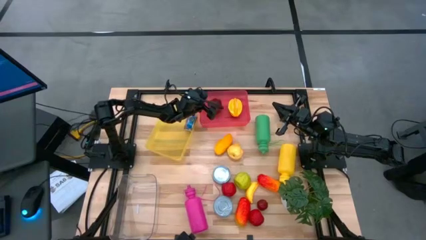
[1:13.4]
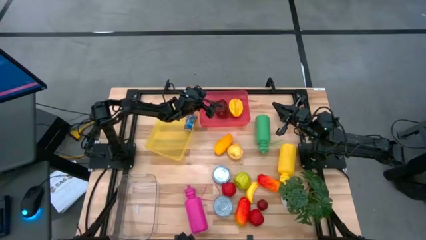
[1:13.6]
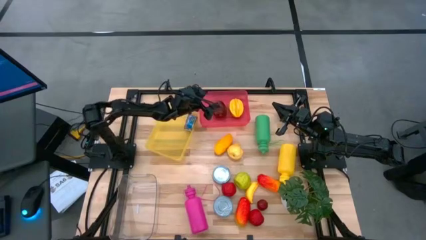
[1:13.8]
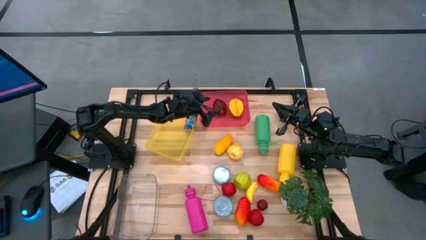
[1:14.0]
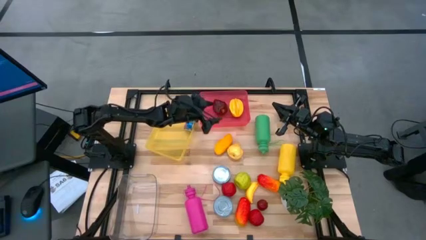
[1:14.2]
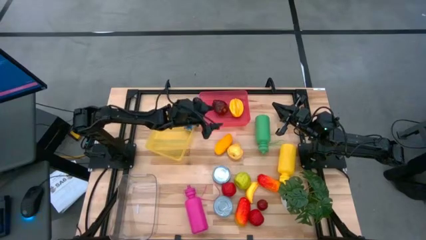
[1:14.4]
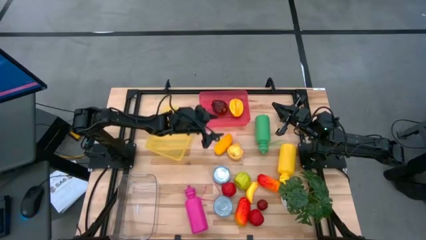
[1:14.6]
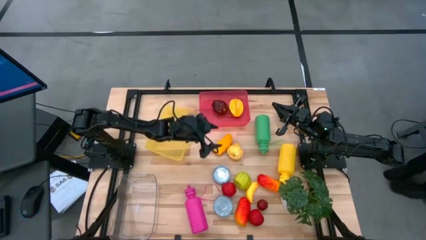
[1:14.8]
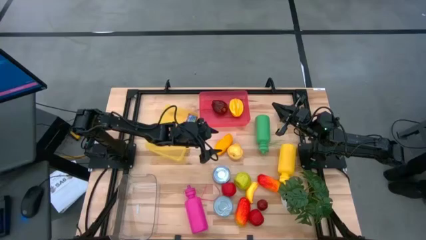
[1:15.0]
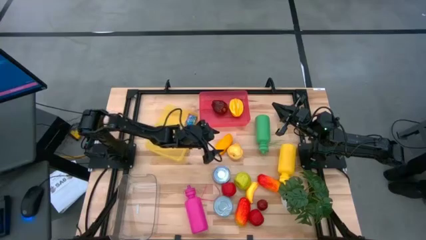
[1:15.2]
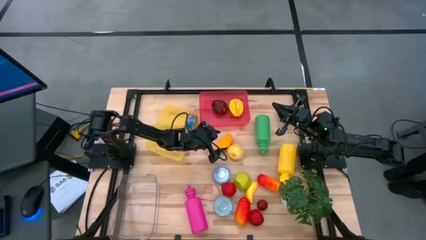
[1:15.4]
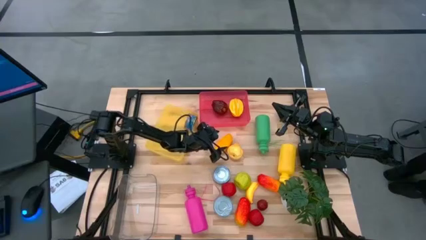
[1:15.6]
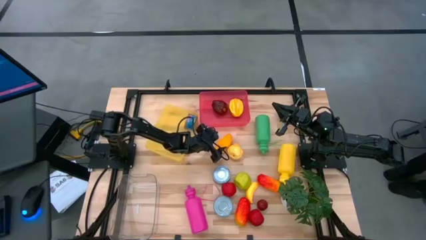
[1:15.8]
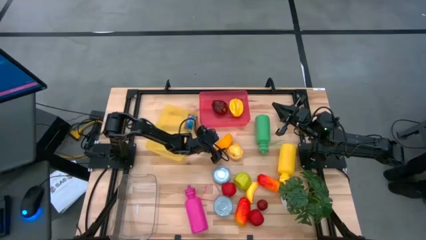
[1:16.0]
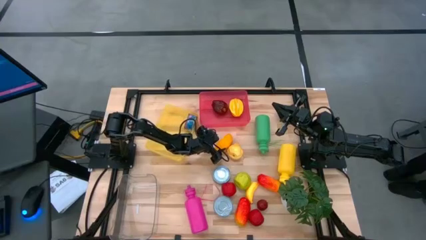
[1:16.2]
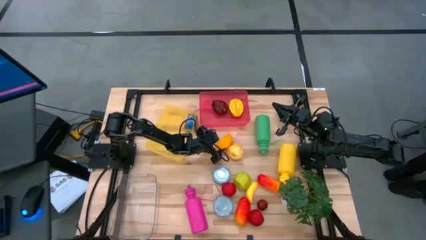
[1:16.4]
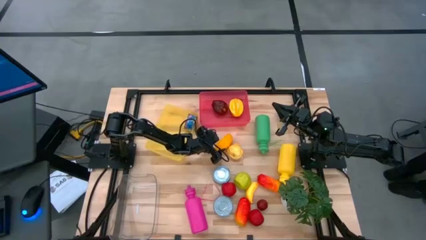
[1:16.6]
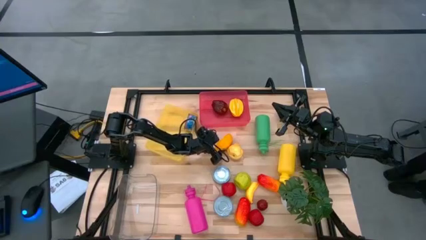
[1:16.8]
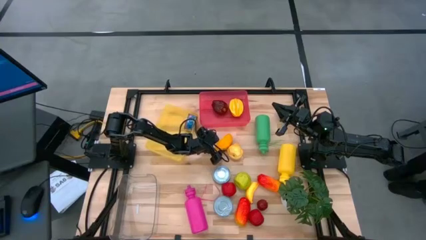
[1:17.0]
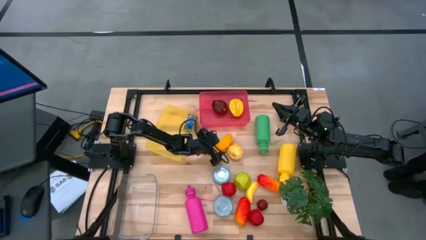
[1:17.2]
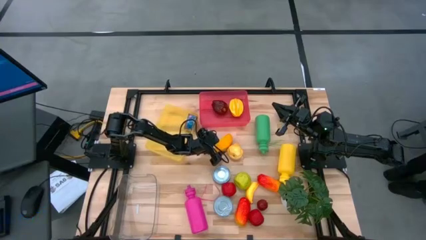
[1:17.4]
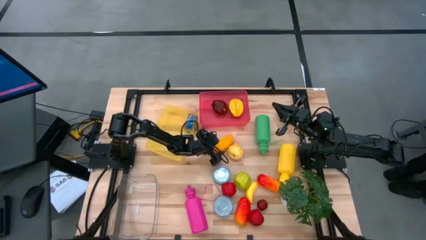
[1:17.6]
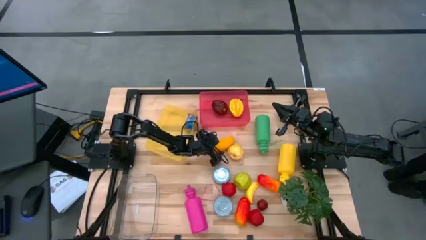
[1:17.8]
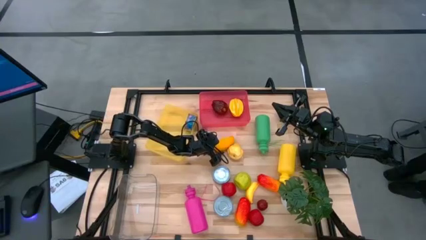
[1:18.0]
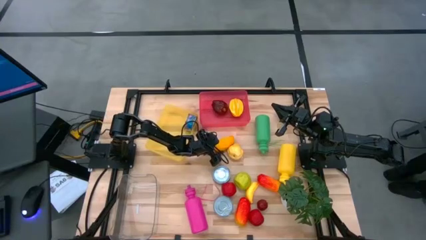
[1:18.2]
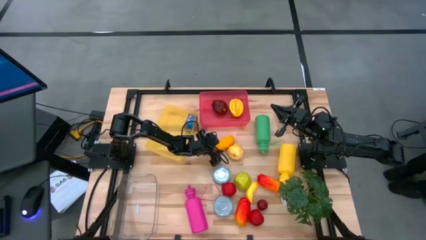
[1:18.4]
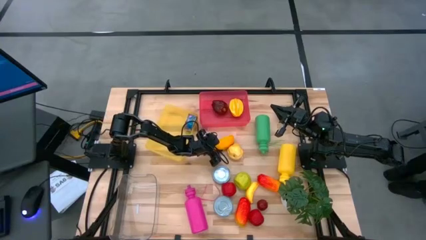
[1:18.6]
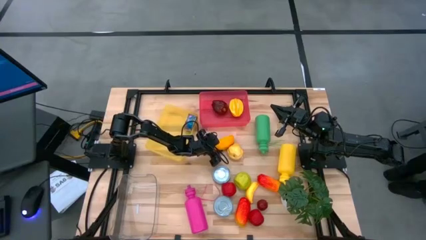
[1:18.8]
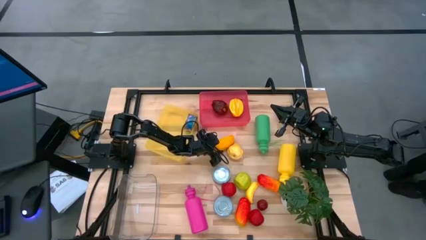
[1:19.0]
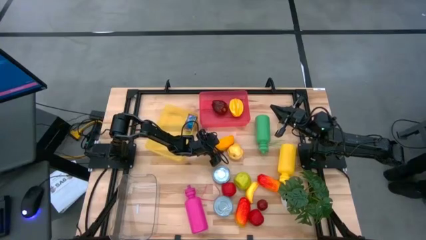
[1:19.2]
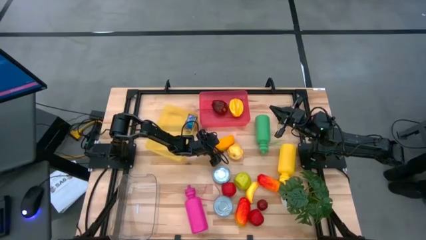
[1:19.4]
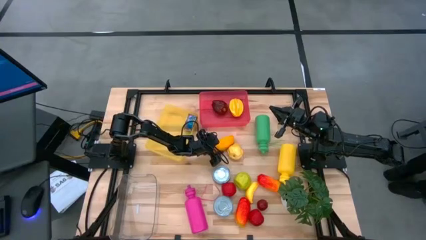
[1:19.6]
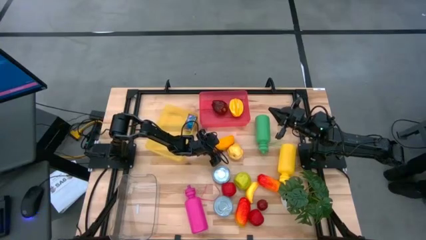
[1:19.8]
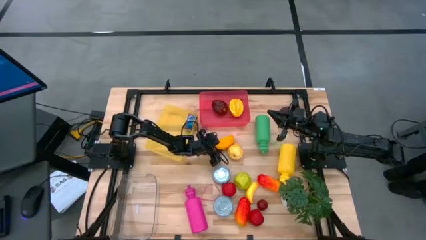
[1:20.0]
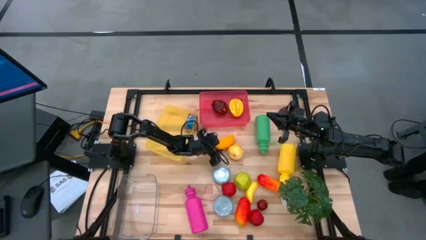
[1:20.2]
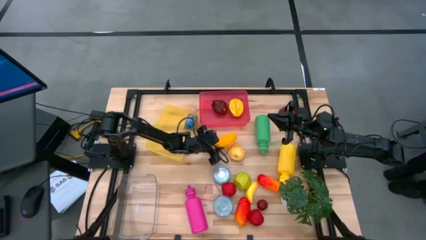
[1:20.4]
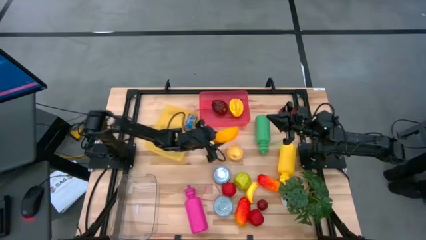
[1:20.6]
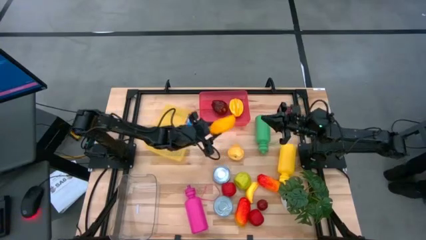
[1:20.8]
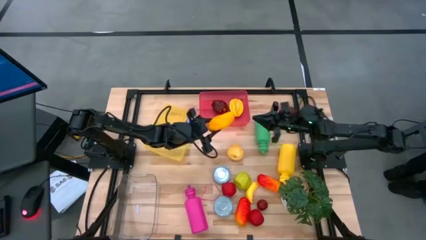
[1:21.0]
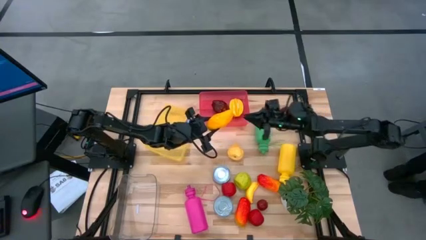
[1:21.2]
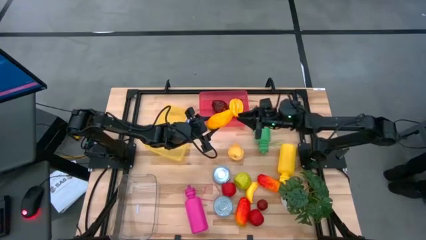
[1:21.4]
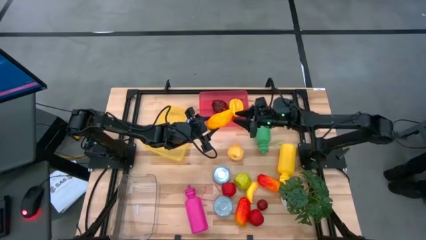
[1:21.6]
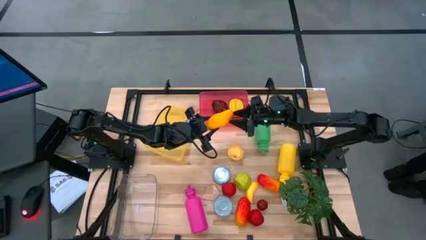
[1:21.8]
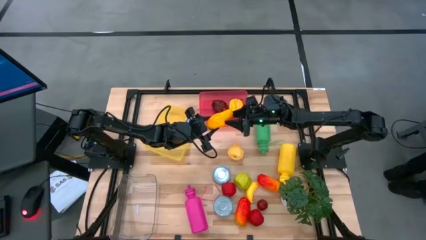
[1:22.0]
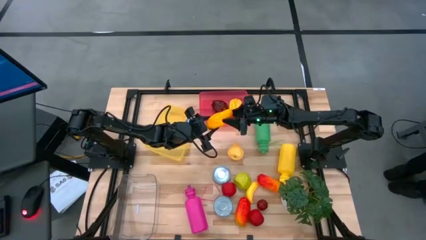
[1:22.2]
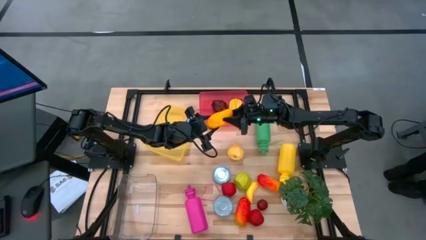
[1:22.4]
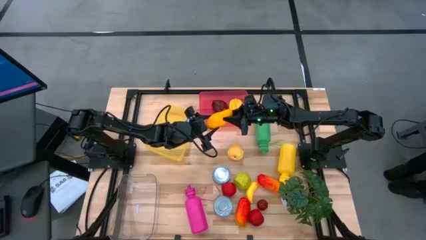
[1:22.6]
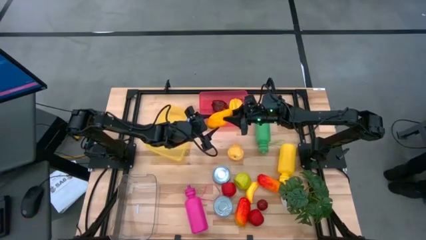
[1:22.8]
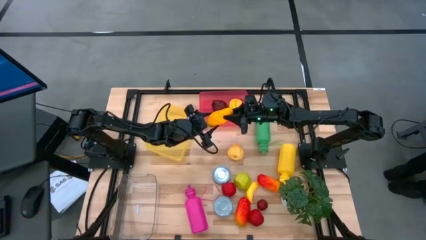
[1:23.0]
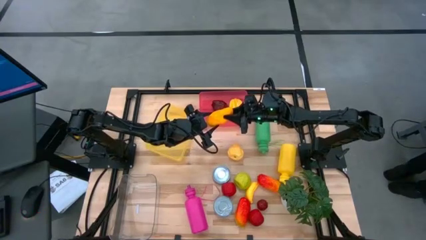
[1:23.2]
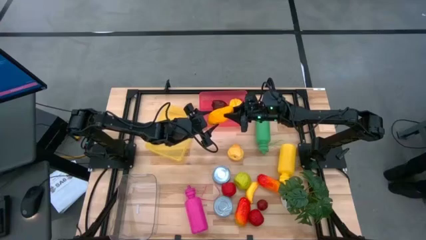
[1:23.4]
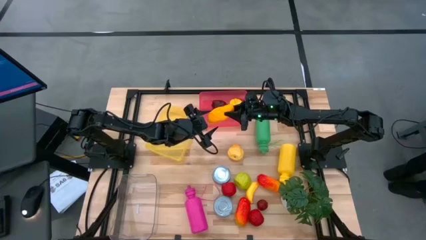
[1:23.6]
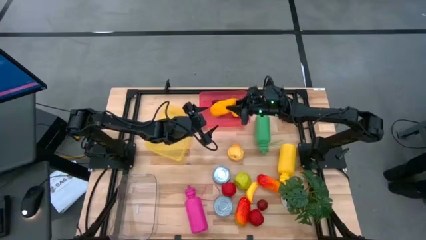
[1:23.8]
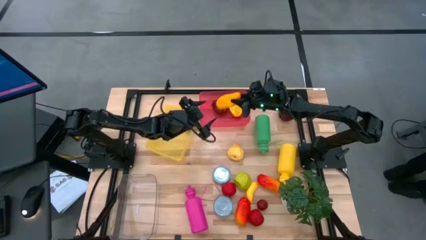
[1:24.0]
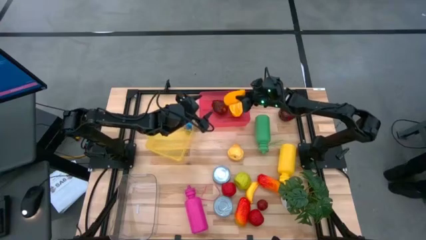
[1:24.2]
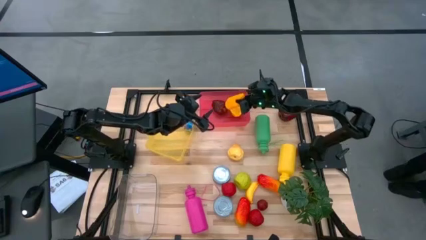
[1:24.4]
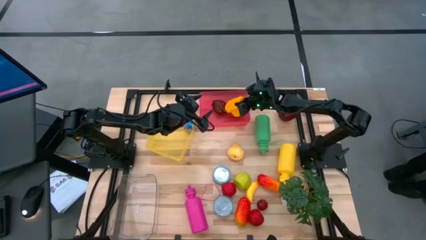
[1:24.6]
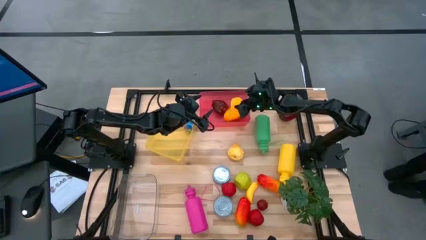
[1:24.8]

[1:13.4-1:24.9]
Task: Pick & Place Food Item
Put the yellow mango into the pink bin
